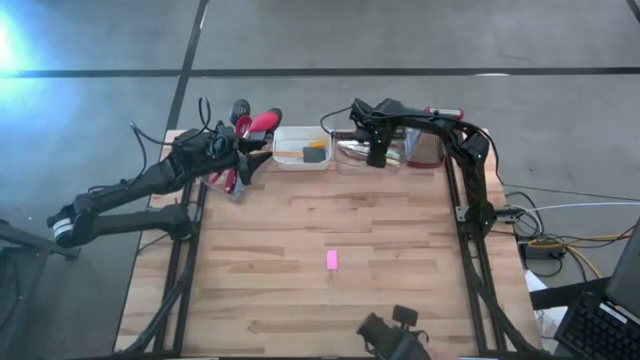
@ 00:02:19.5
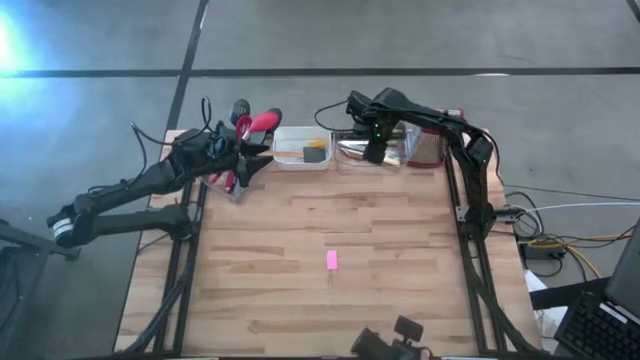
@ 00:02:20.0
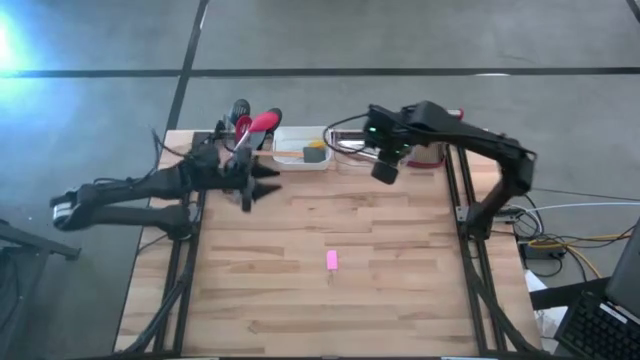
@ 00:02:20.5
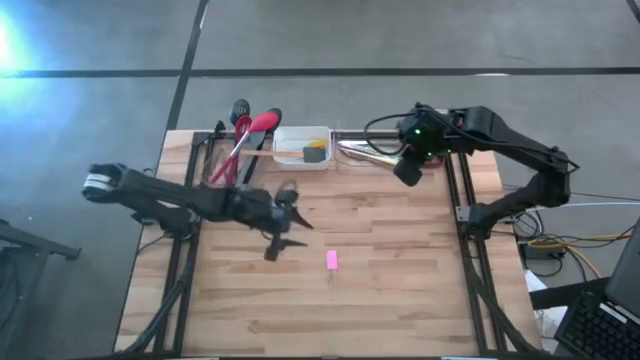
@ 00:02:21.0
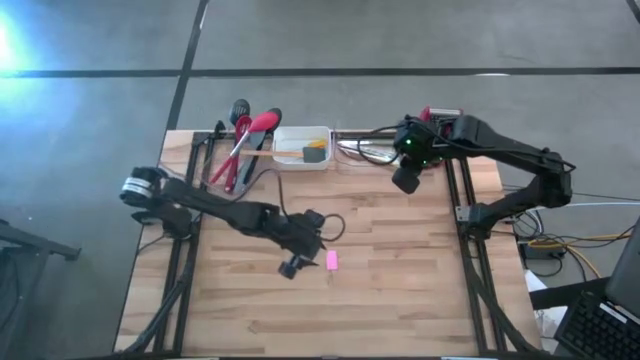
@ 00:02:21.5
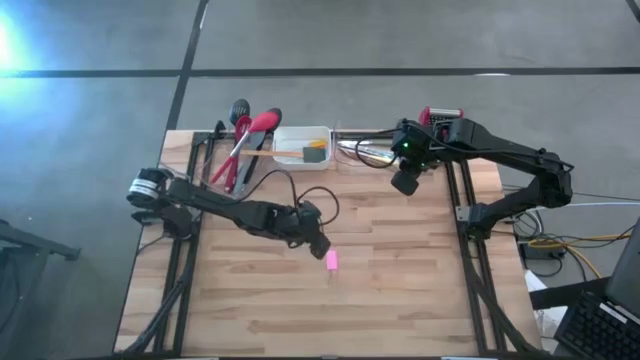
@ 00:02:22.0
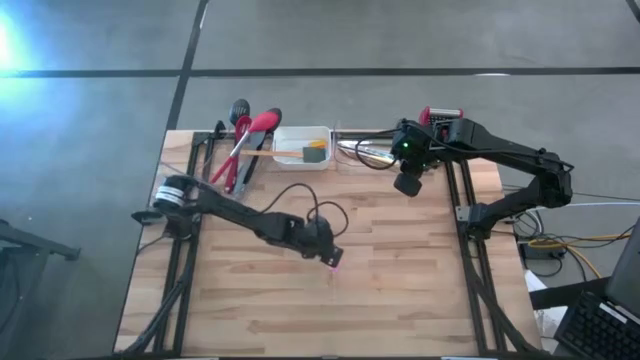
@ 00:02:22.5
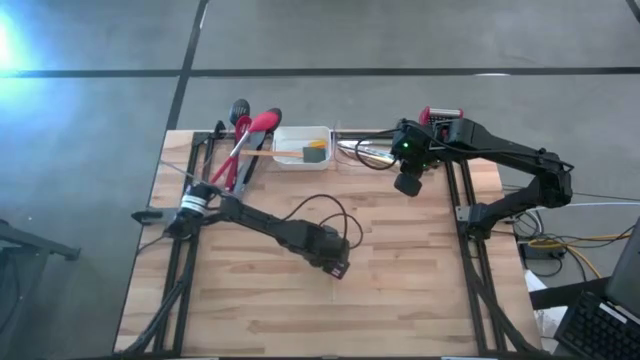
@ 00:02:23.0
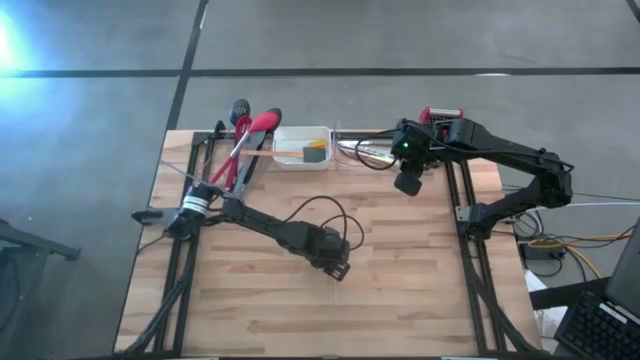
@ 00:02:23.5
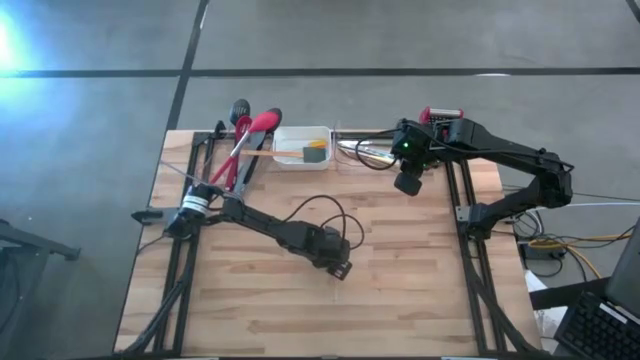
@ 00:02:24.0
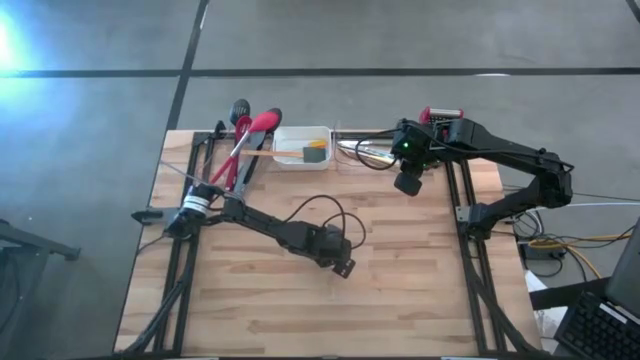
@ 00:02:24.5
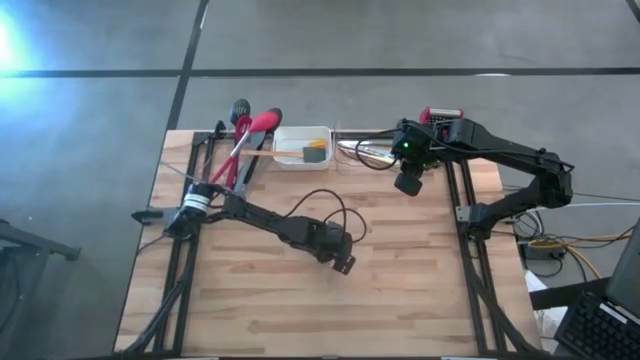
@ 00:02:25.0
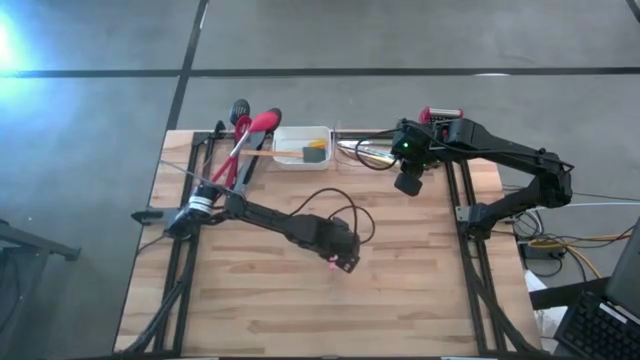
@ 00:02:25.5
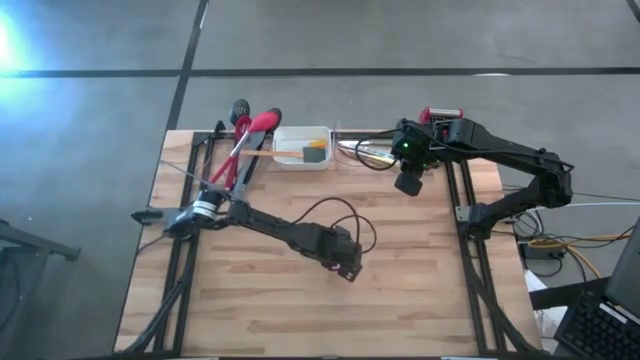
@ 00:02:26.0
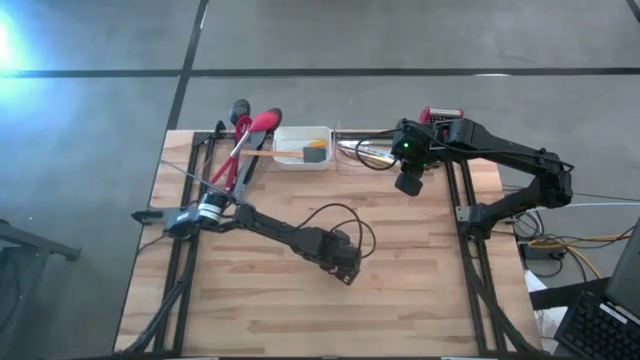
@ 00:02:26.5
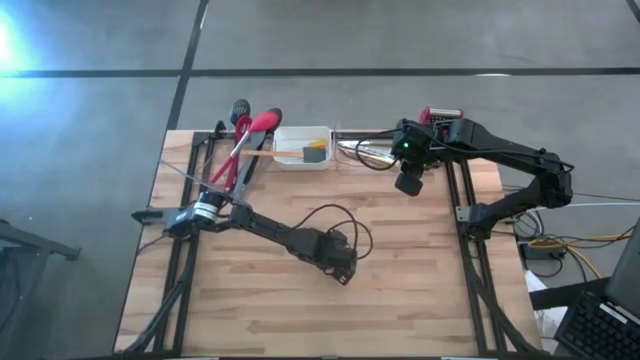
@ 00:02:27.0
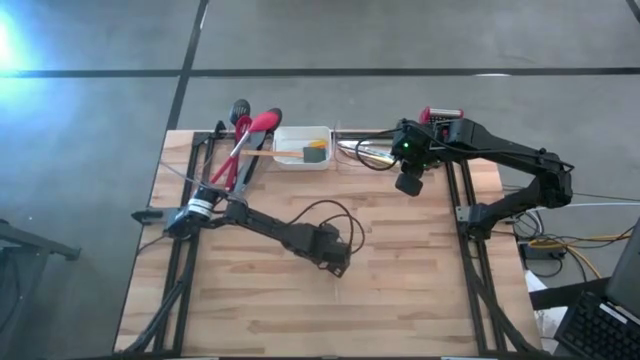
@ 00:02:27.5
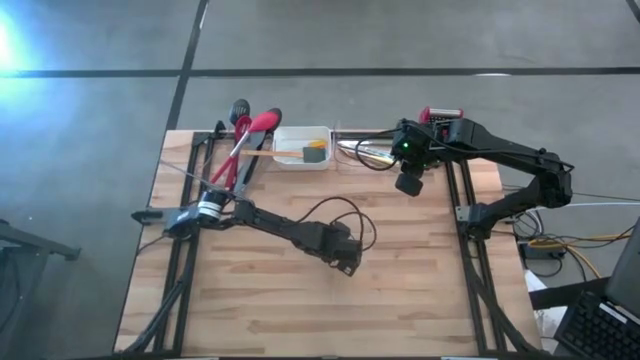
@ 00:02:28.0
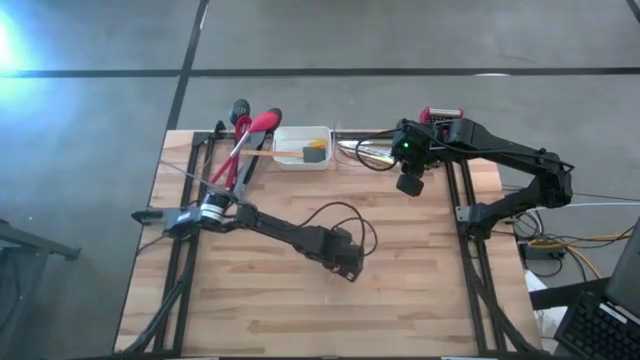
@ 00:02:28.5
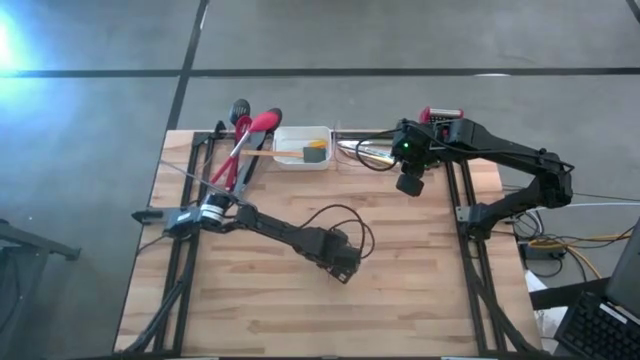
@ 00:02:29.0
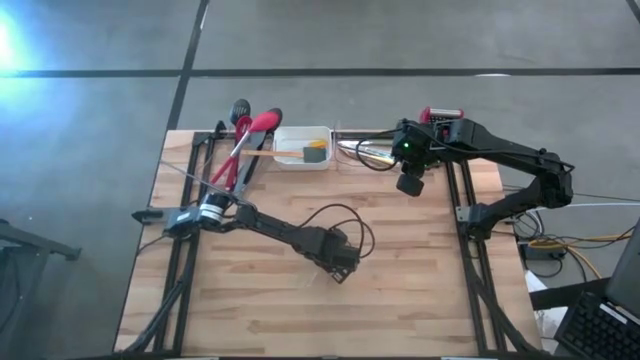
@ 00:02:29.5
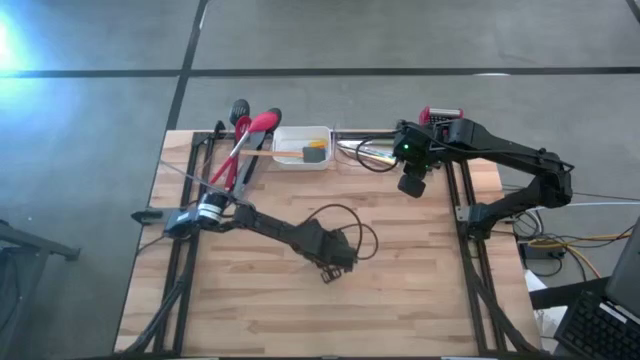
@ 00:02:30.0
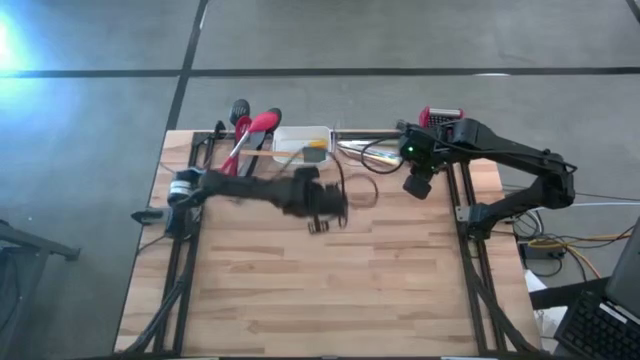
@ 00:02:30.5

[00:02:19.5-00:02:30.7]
Task: Pick & Place Kitchen Items
Put the pink spatula into the white bin

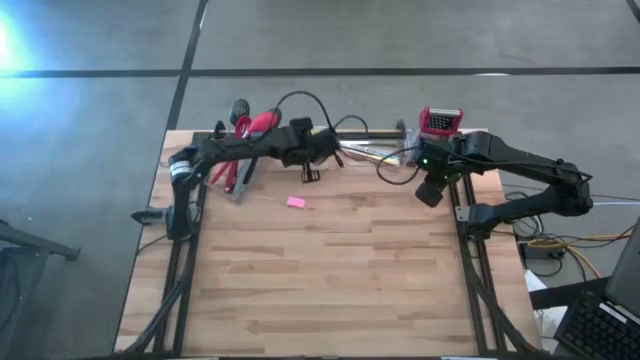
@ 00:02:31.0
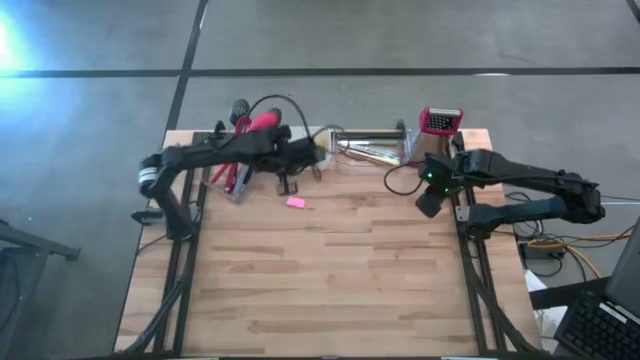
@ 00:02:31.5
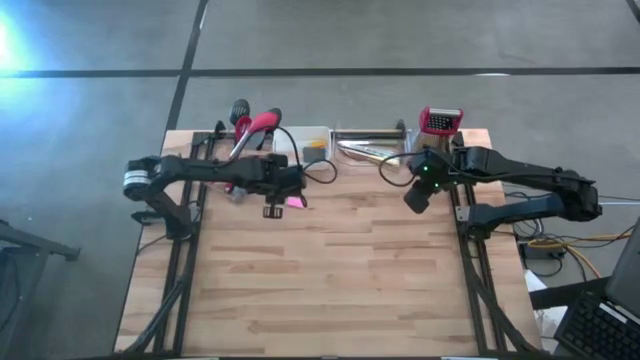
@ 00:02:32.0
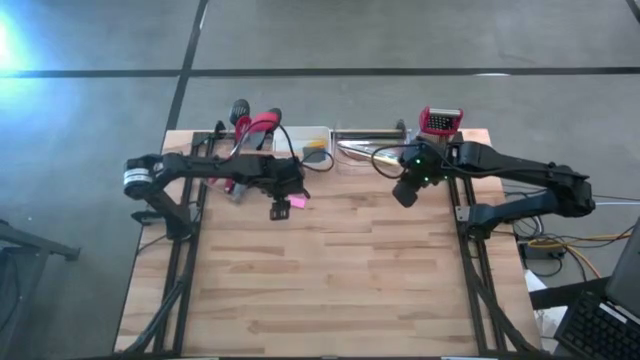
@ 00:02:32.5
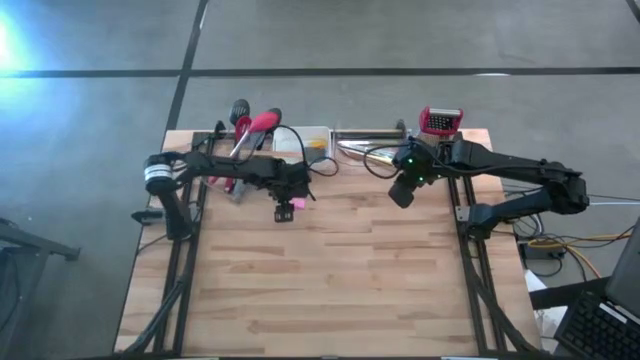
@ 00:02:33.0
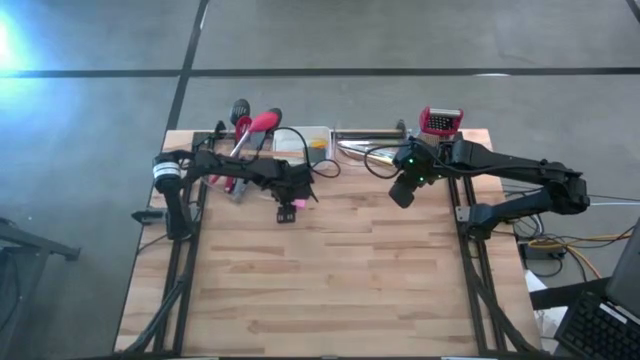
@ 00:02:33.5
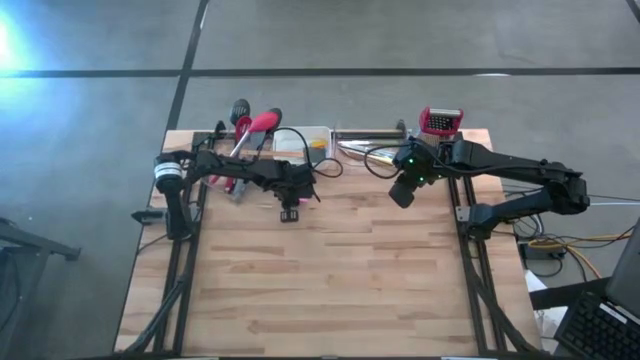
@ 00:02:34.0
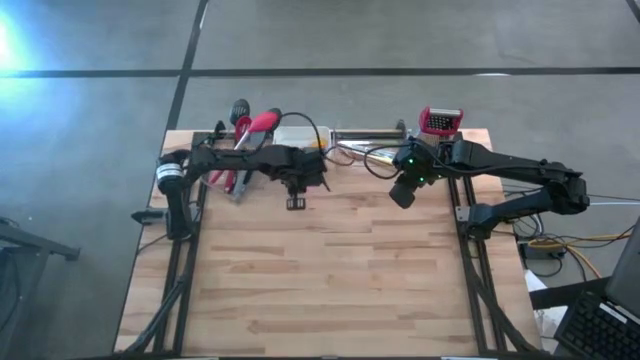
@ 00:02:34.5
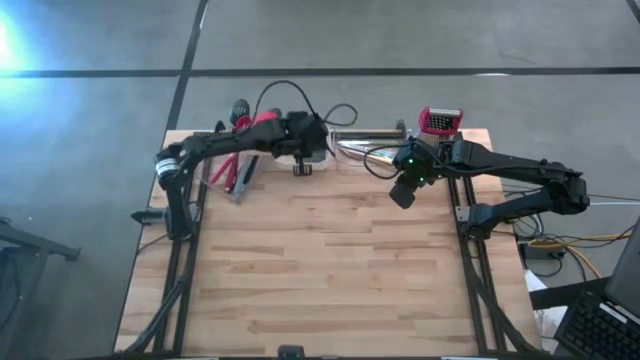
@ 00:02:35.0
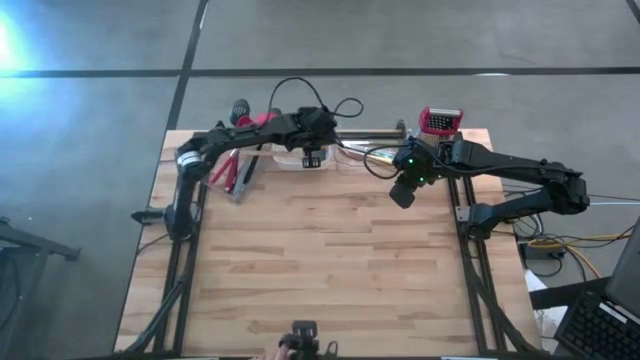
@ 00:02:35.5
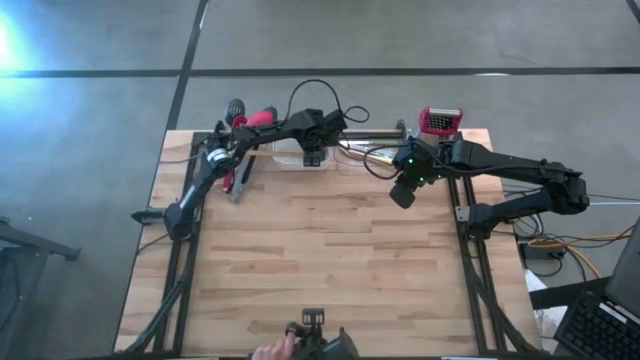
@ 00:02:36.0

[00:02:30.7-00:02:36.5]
Put the pink spatula into the white bin

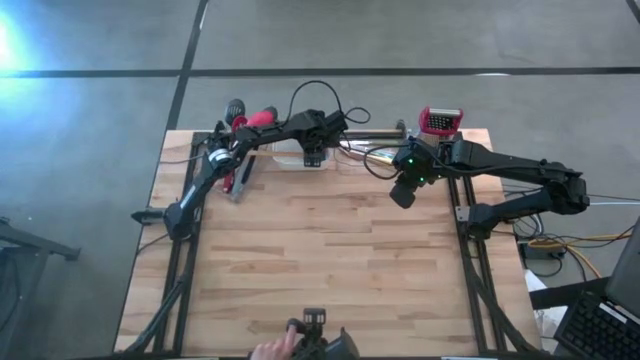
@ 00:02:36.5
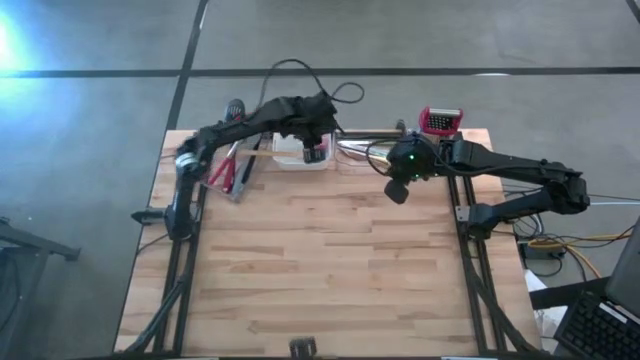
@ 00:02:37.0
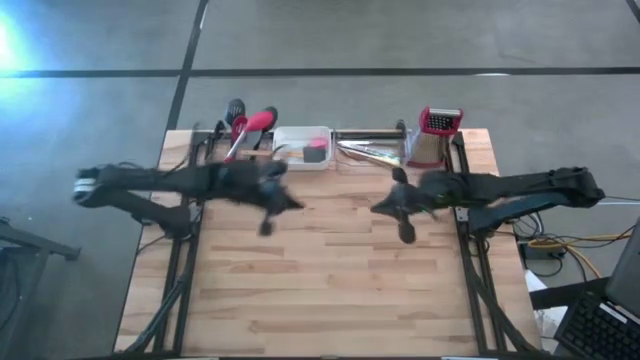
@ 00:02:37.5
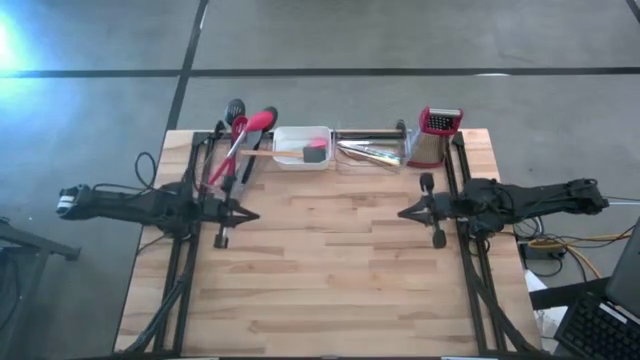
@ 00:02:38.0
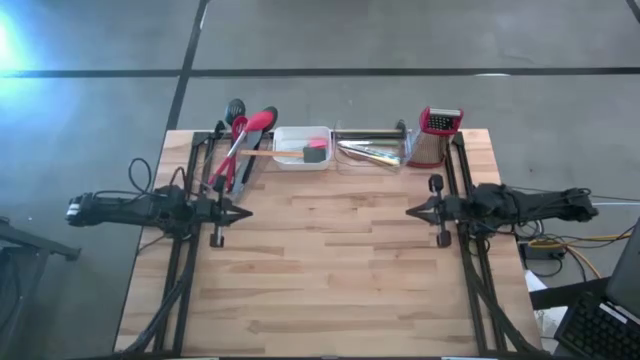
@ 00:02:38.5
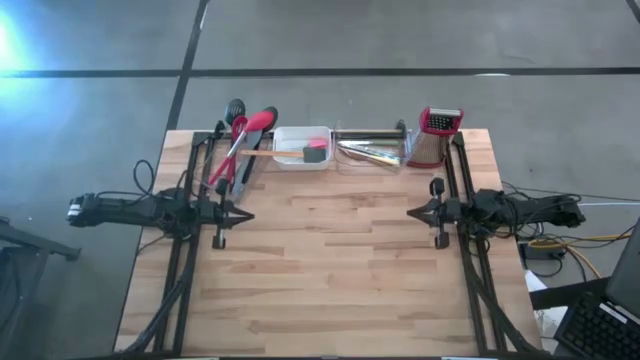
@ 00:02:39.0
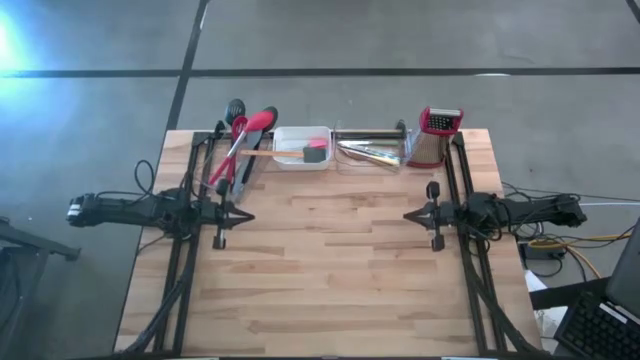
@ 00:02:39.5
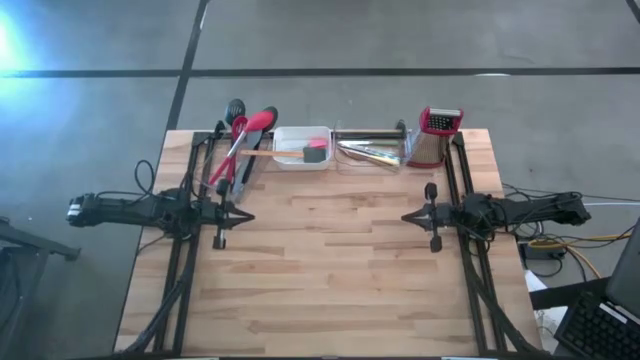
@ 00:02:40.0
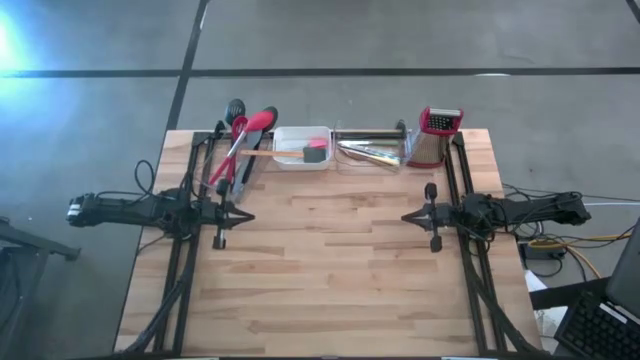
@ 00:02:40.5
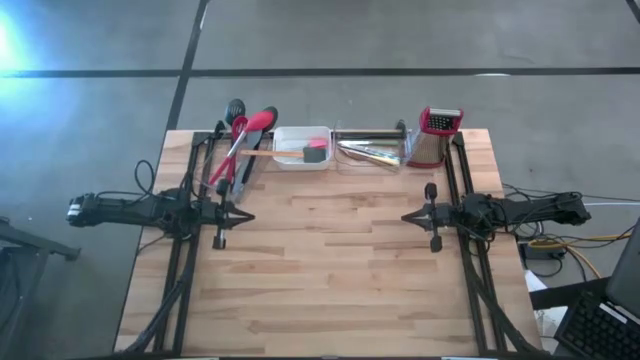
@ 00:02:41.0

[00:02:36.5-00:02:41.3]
Return to Home Position
